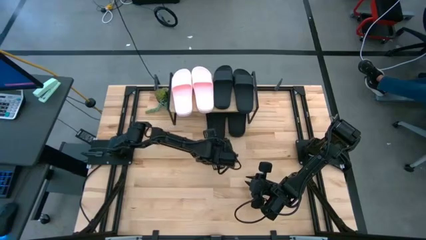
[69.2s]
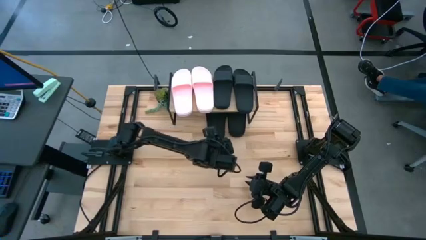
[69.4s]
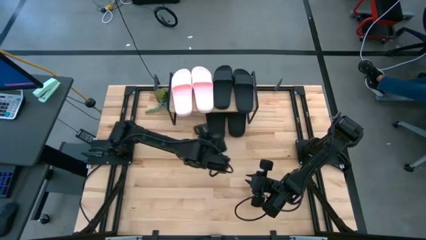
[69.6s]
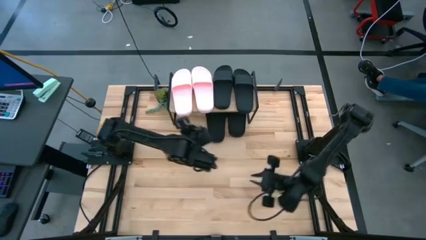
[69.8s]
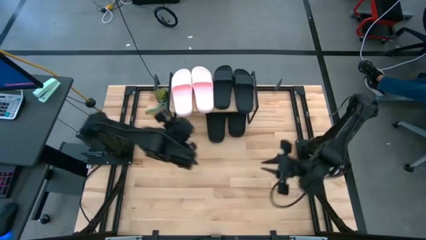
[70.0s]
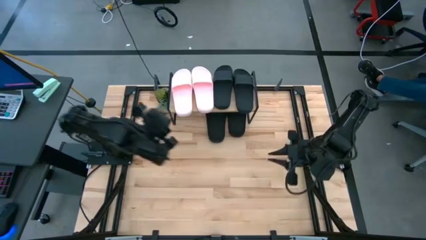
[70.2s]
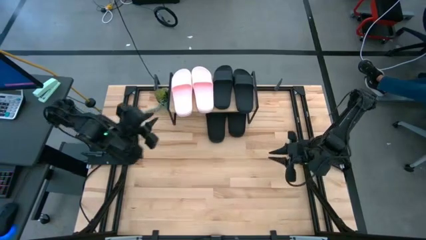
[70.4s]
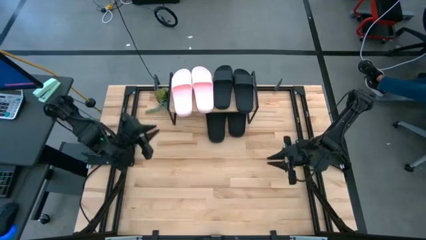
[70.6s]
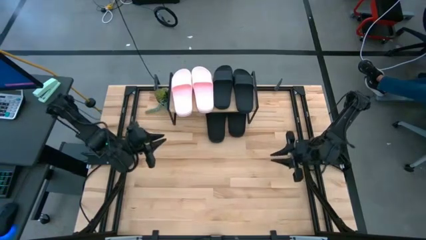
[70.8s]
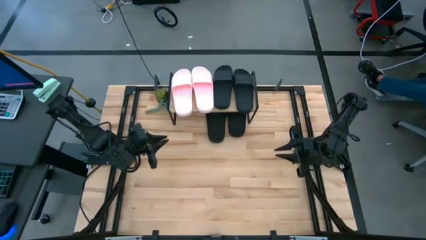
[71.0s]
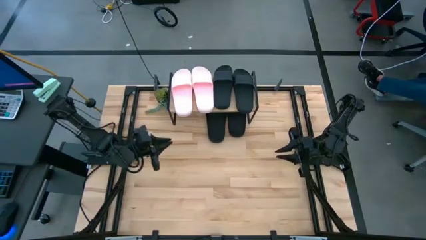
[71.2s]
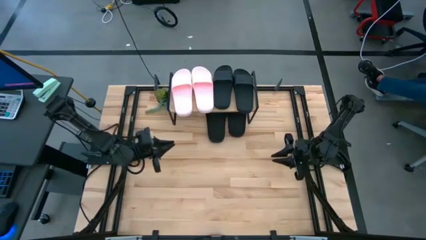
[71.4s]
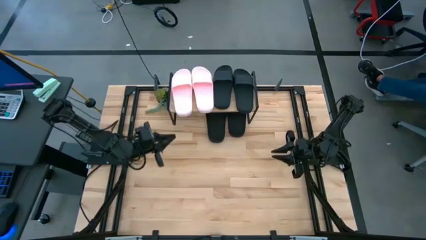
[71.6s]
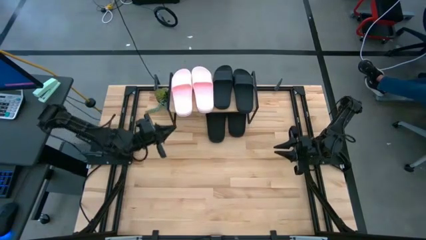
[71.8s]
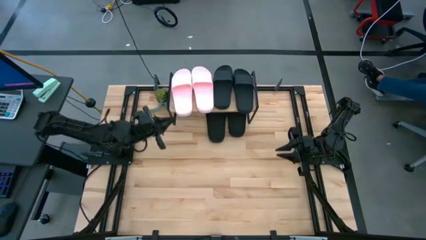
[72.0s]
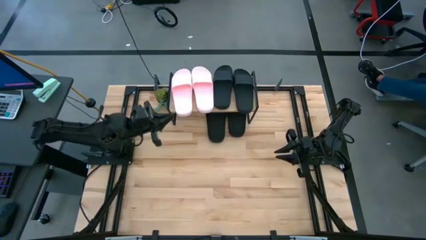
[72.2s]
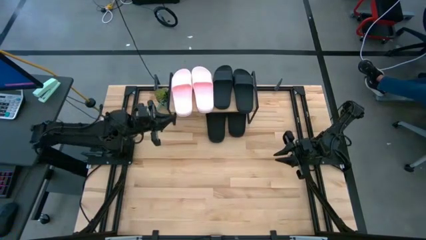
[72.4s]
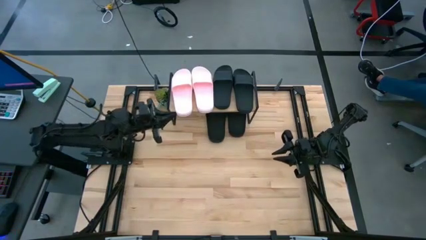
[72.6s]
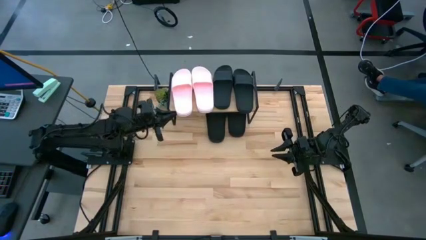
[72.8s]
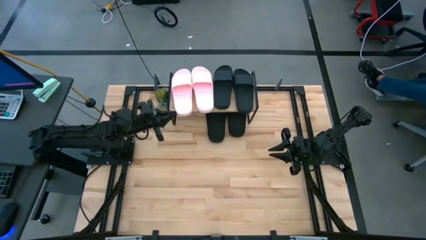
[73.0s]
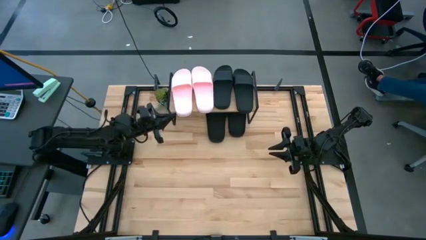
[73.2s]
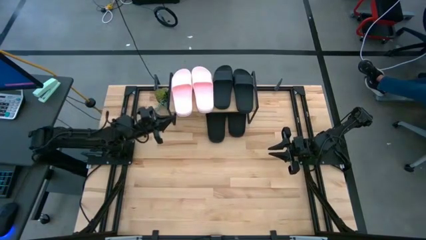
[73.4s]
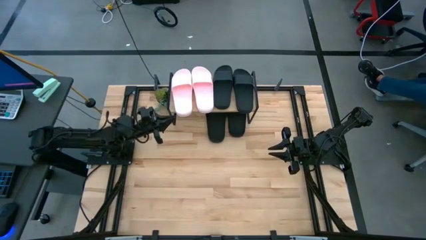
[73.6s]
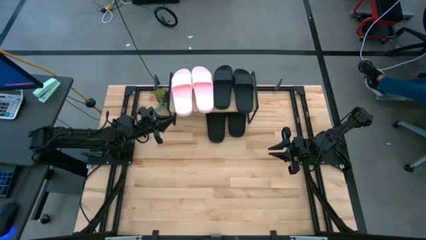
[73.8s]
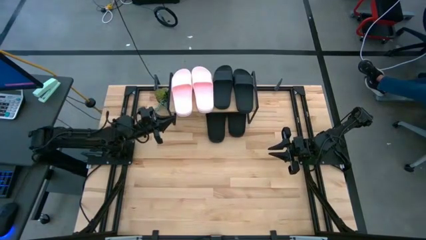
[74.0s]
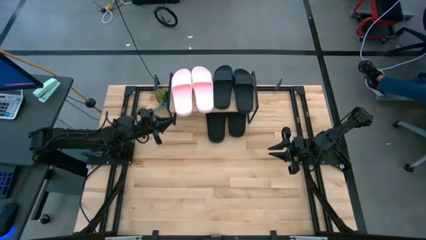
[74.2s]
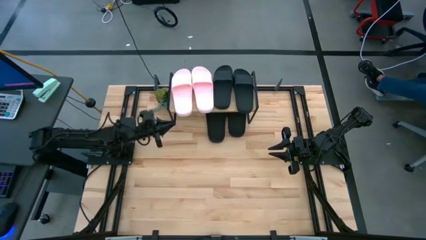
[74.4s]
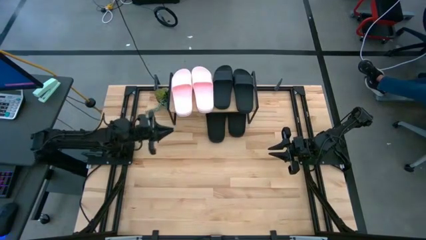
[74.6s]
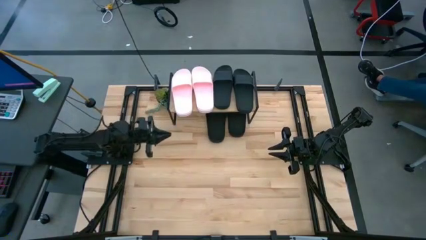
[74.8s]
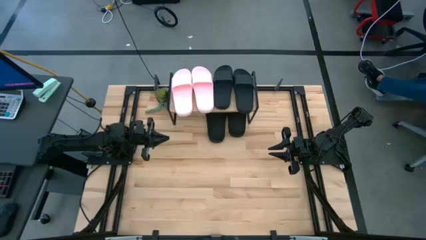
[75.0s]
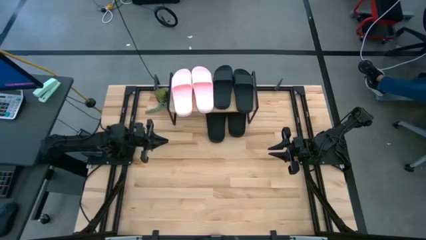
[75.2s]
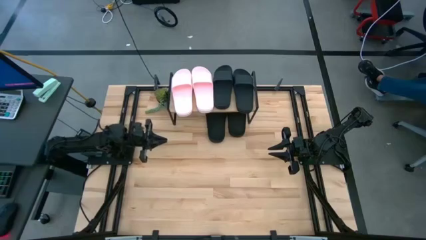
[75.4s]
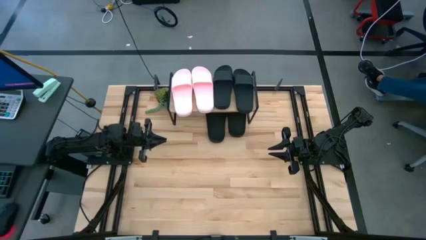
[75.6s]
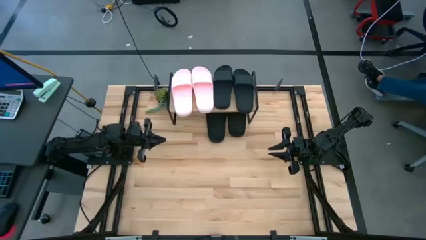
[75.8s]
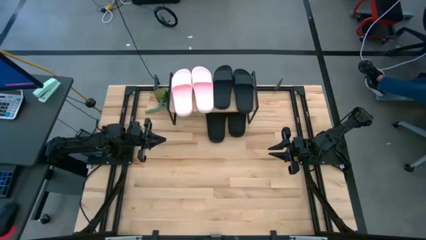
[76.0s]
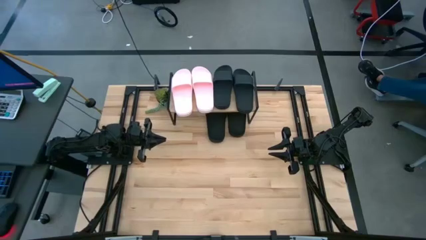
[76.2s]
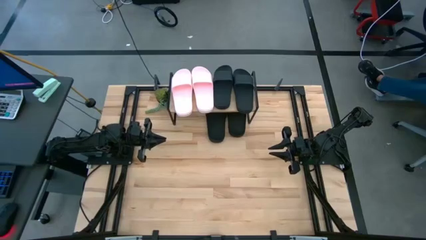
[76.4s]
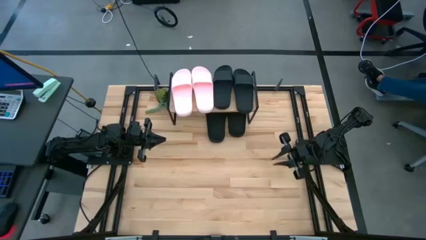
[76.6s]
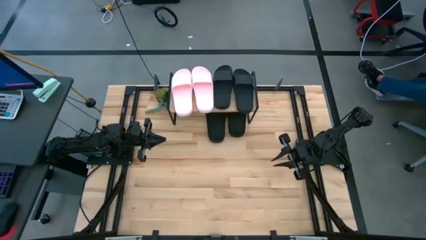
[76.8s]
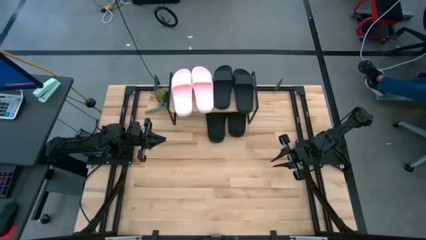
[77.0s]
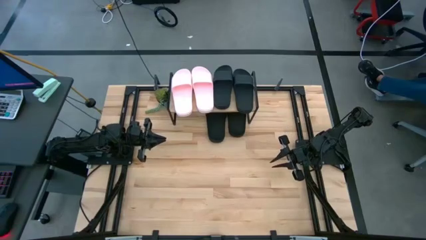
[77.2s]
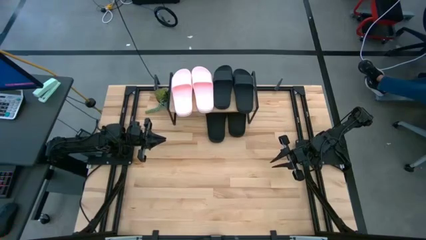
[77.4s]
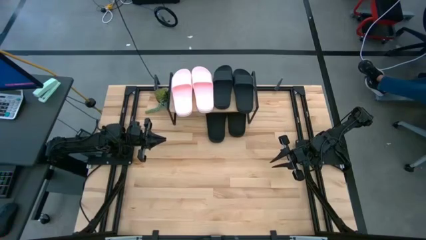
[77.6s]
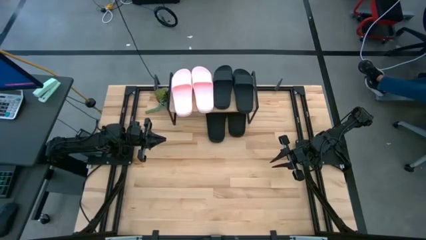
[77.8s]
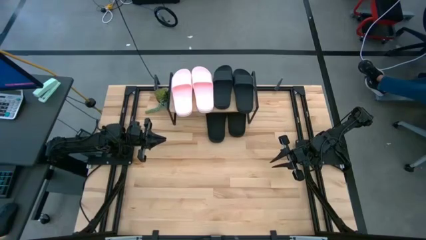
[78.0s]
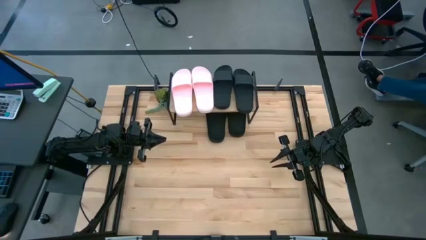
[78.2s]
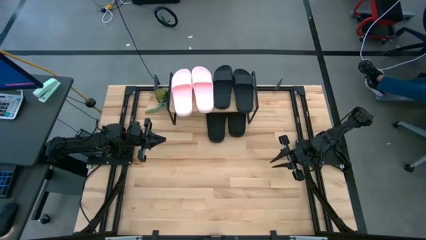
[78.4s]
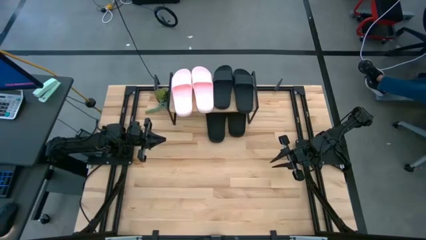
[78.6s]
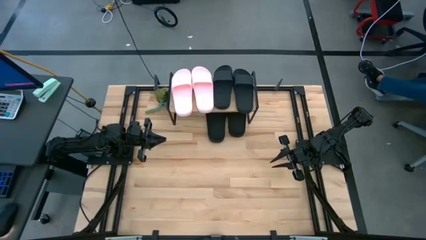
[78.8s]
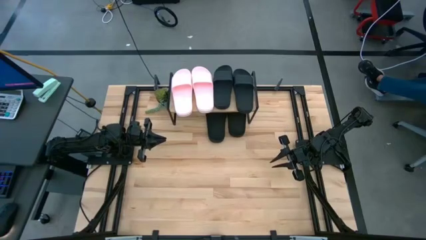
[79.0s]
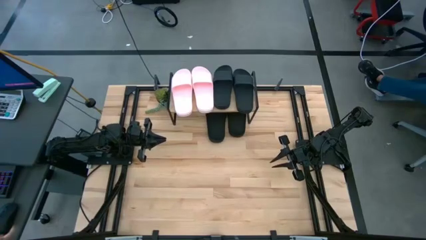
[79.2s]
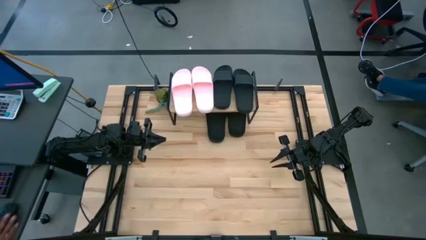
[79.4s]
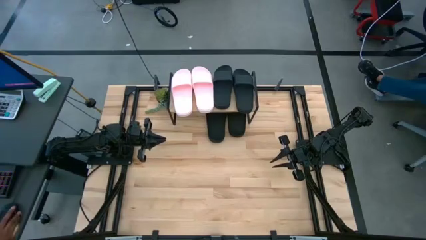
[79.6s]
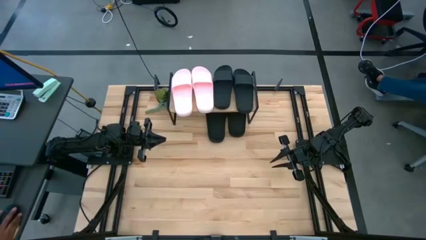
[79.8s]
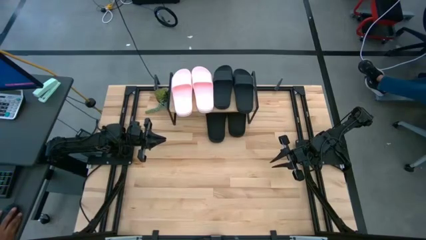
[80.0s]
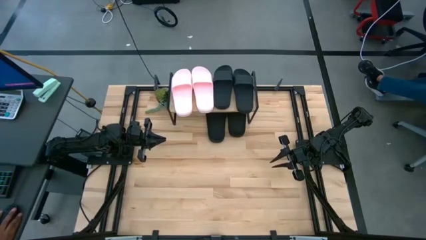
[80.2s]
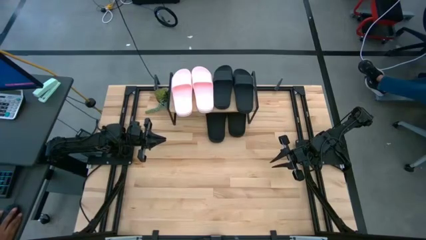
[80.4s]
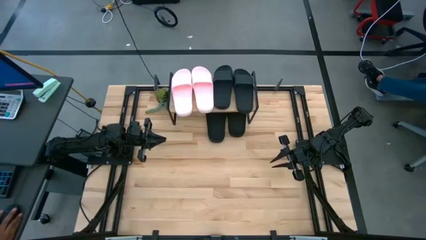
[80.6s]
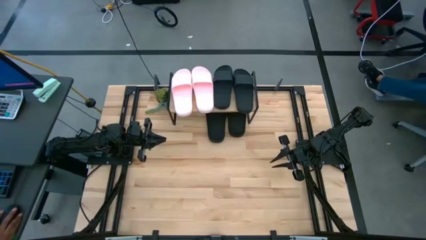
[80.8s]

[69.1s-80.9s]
Task: Pick and place slides into the shelf
Return to Home Position
